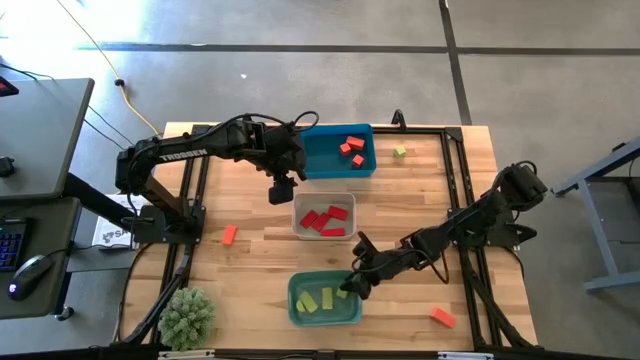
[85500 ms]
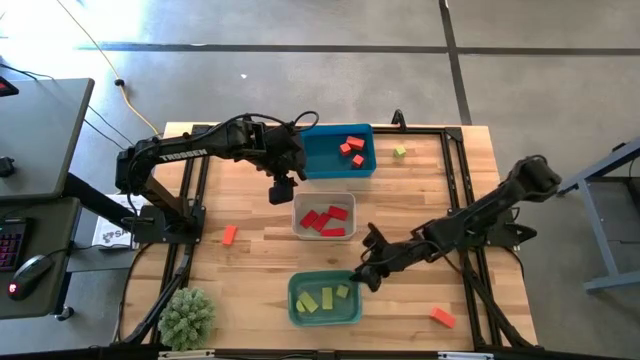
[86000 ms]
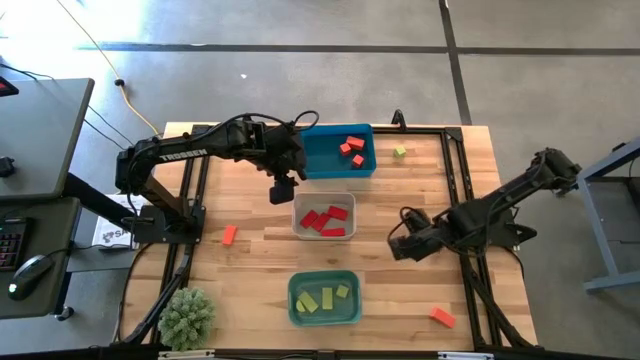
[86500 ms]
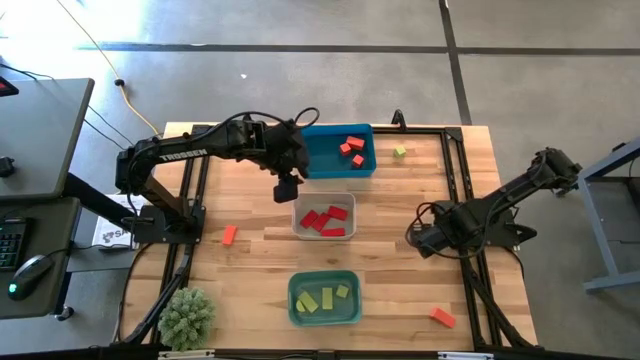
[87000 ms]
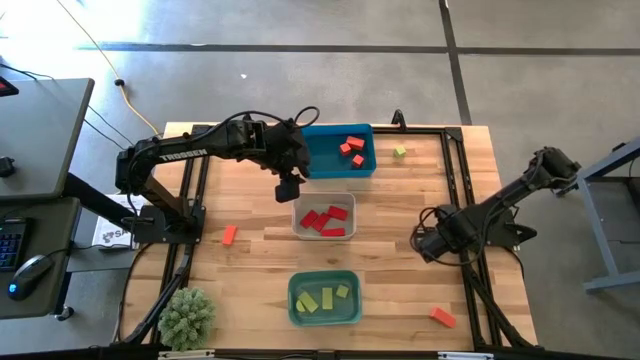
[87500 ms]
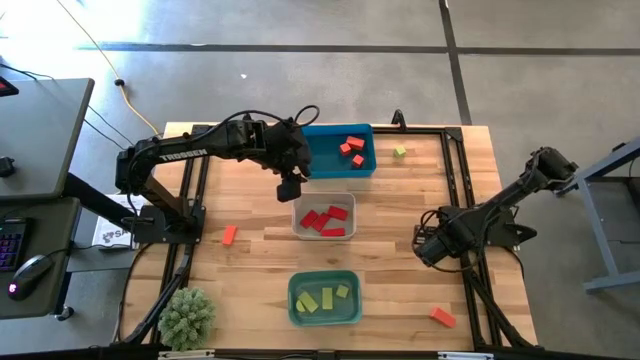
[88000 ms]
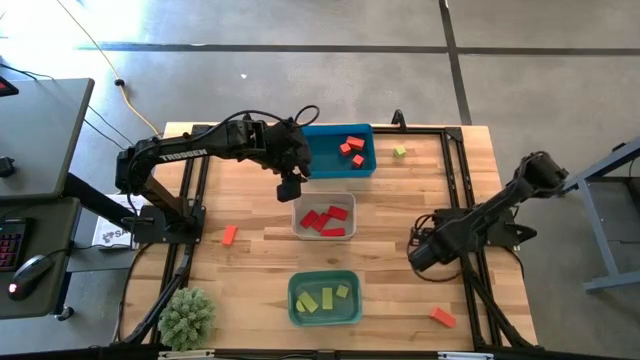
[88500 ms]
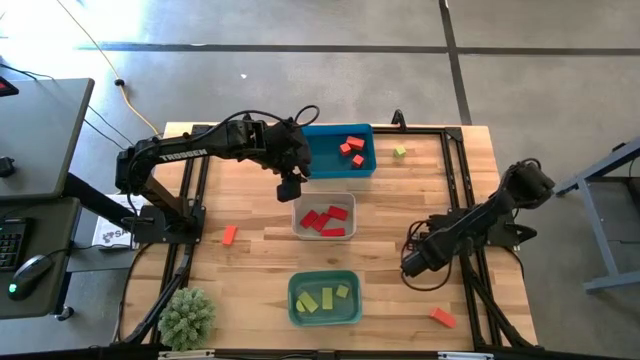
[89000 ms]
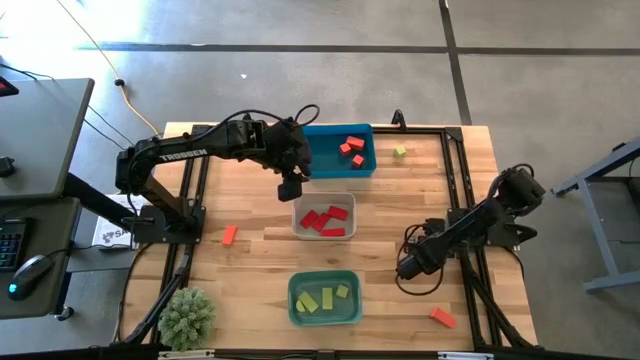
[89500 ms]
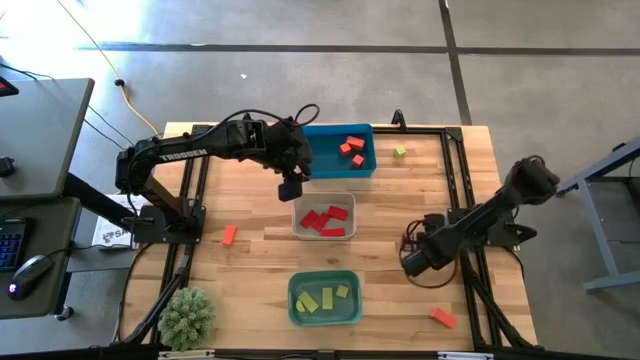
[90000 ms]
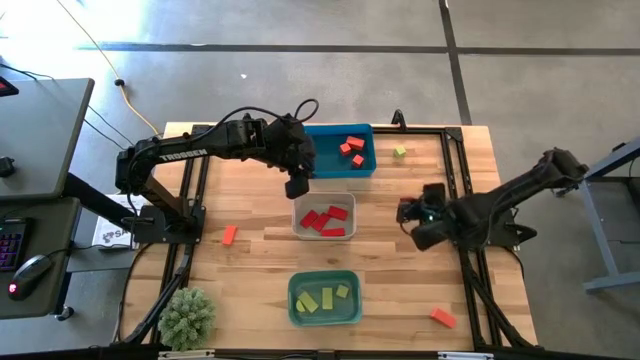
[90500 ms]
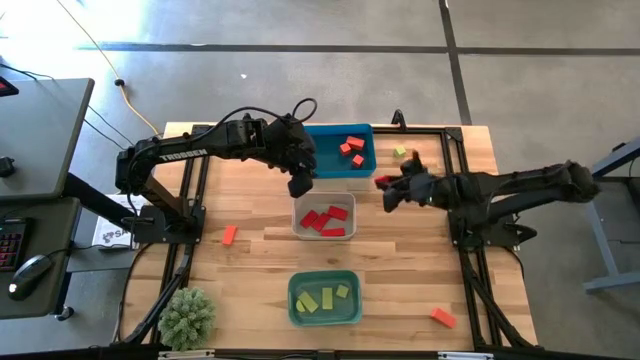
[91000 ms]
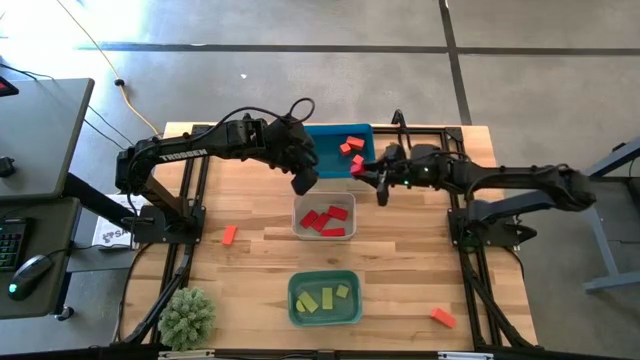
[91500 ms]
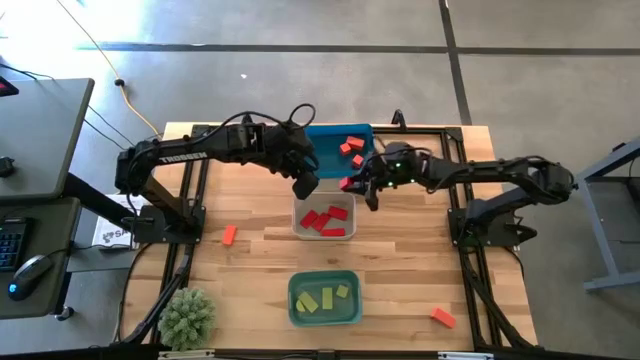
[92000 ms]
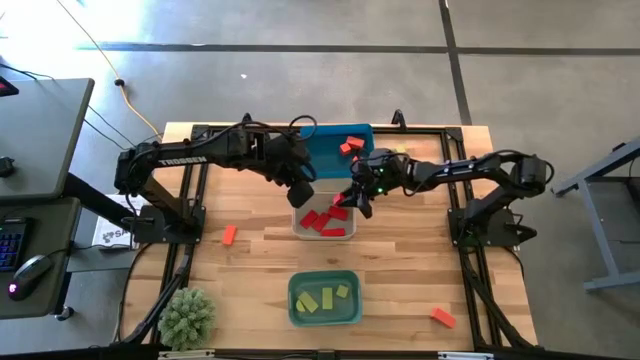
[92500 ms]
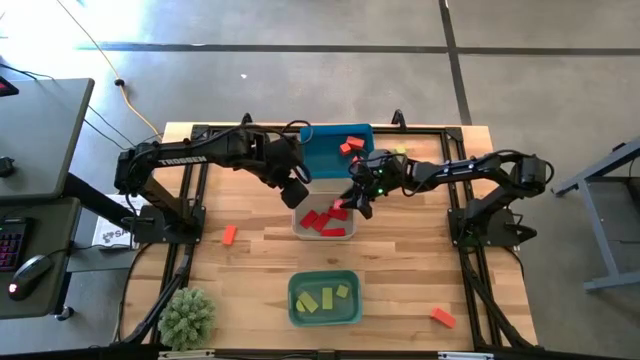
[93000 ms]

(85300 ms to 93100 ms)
Task: Sort & place blocks by color
Put the red block into the gray bin

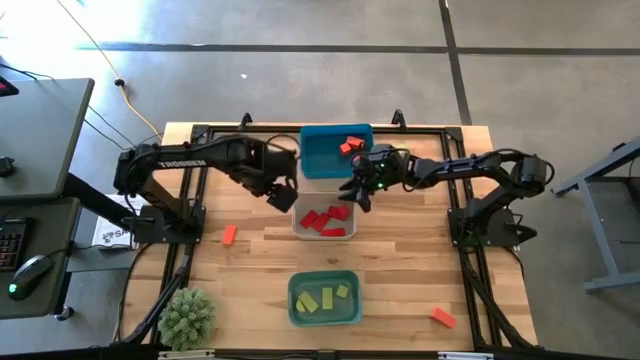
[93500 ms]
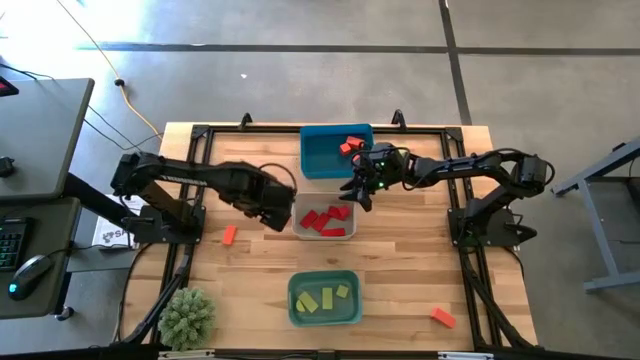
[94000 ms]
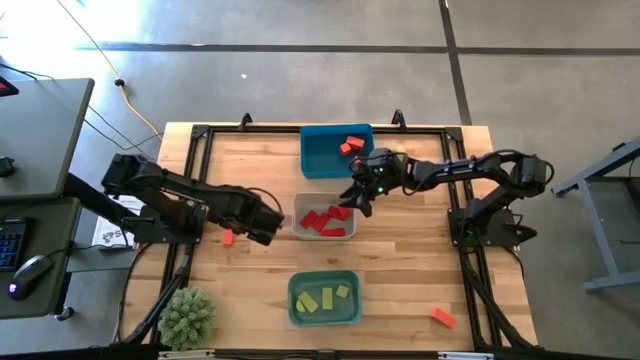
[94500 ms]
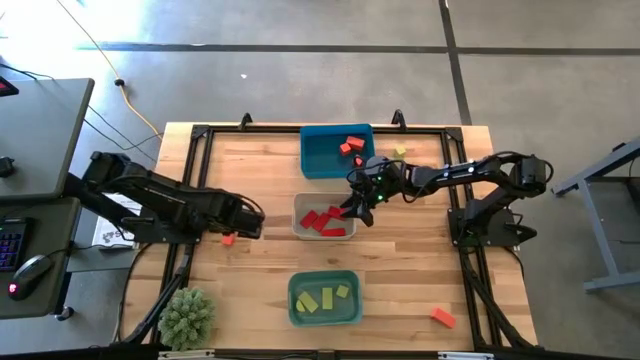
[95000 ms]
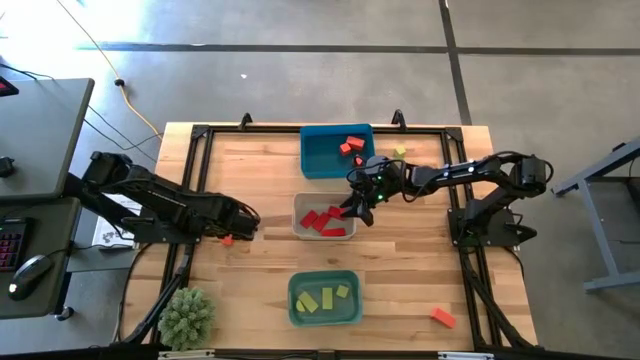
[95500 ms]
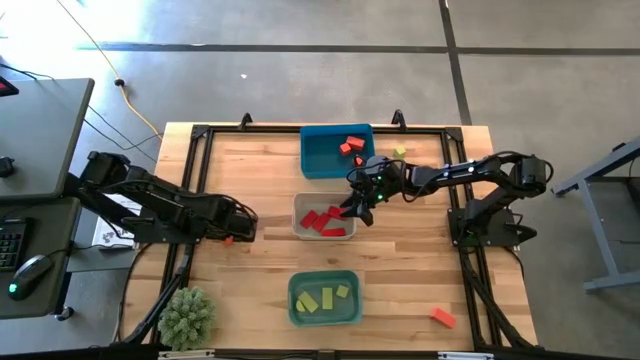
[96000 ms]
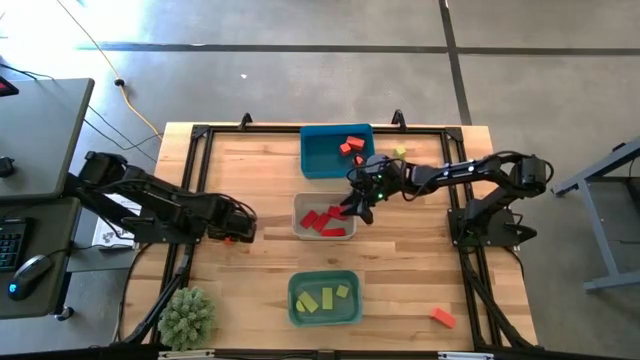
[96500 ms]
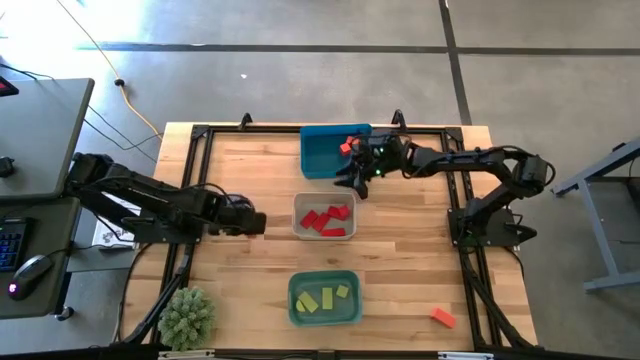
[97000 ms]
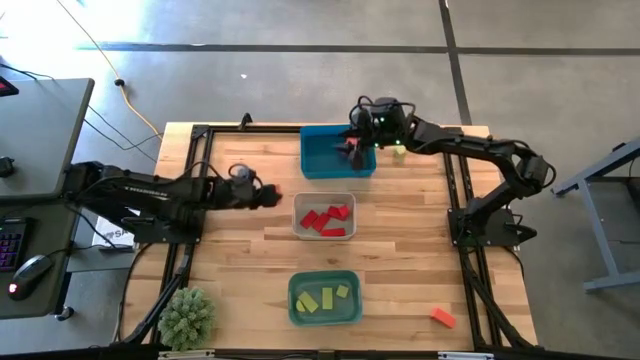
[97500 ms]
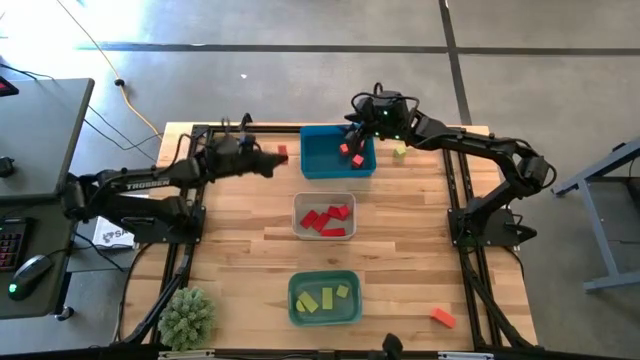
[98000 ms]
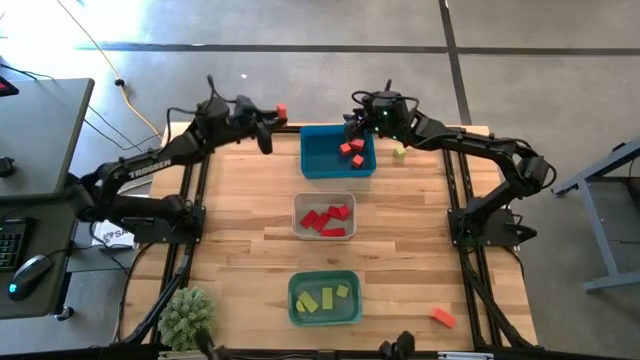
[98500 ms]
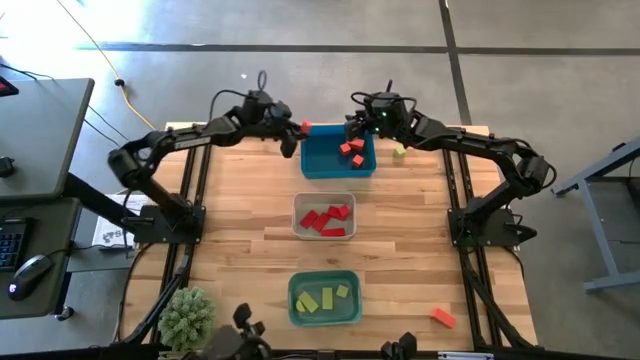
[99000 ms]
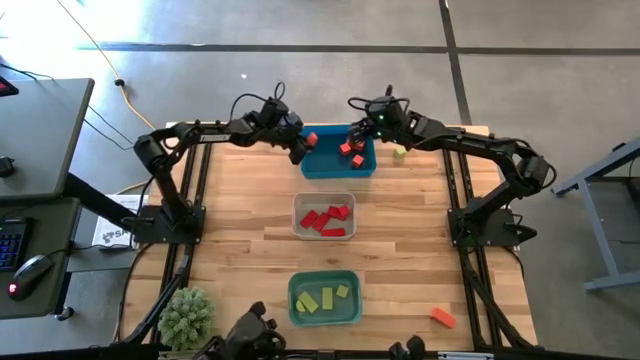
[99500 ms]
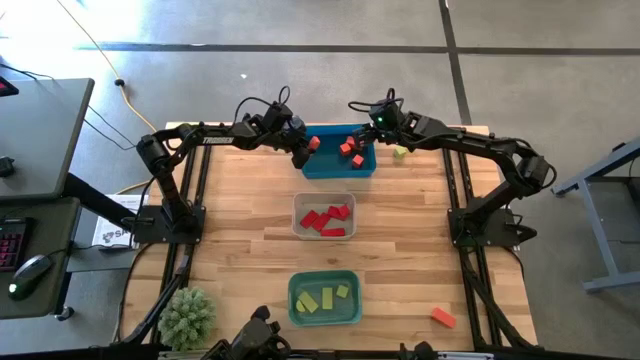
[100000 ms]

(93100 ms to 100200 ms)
Put the orange block into the blue bin

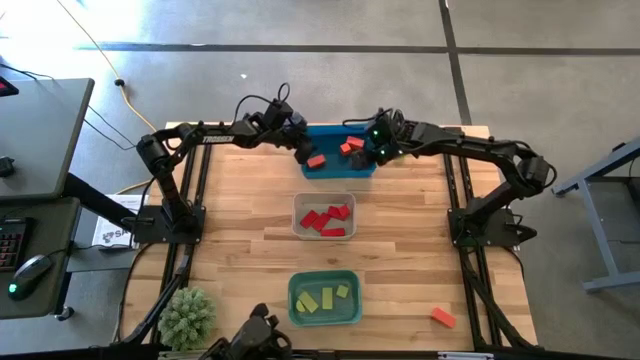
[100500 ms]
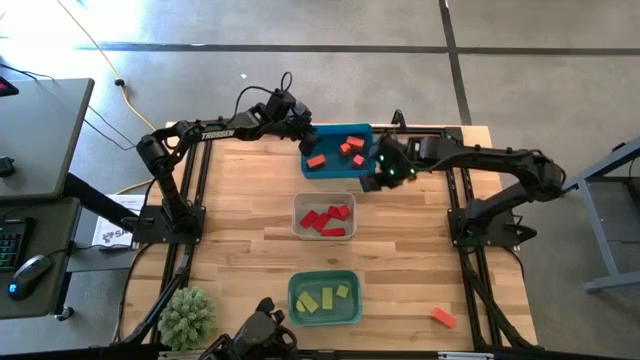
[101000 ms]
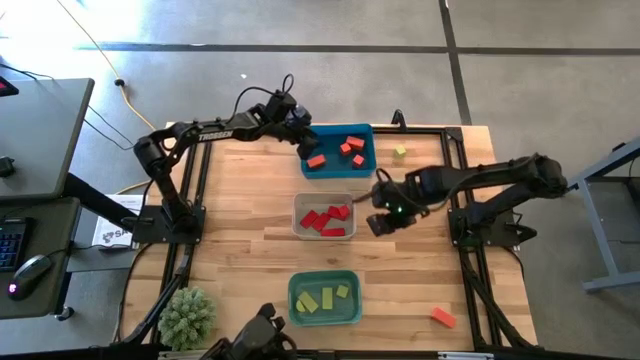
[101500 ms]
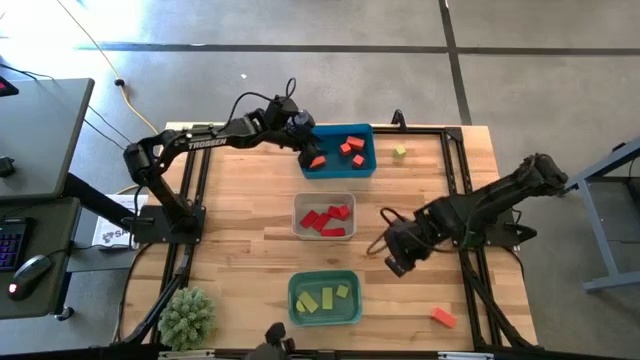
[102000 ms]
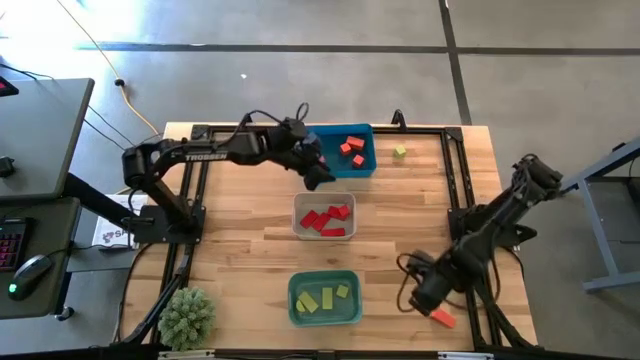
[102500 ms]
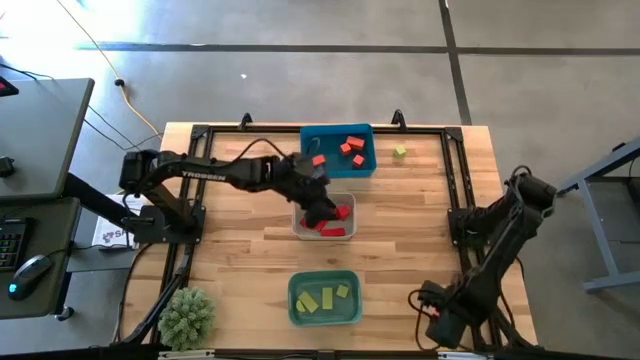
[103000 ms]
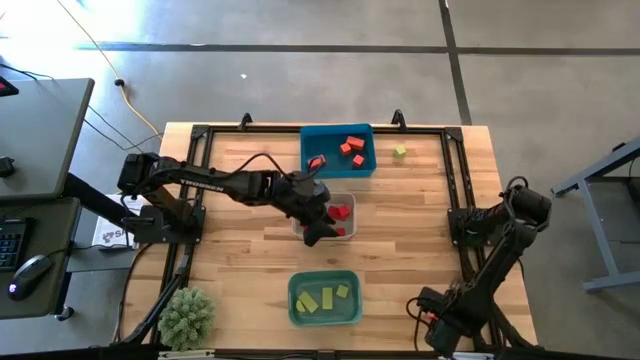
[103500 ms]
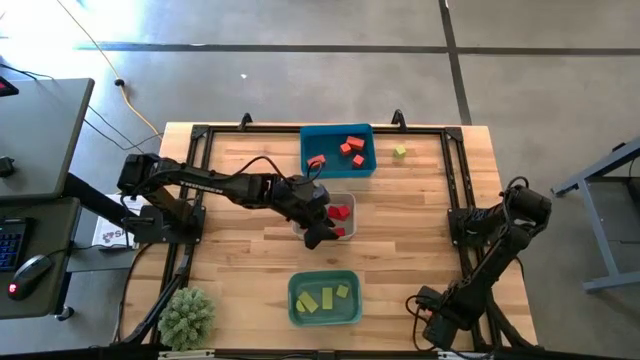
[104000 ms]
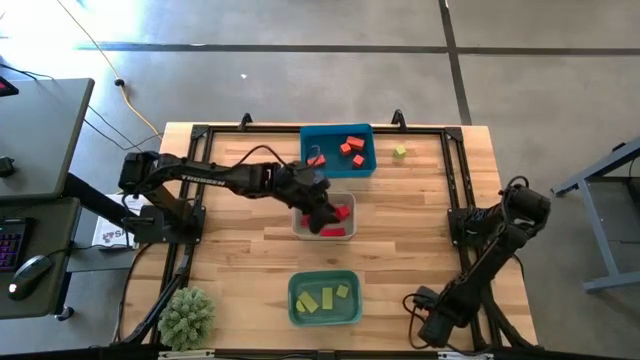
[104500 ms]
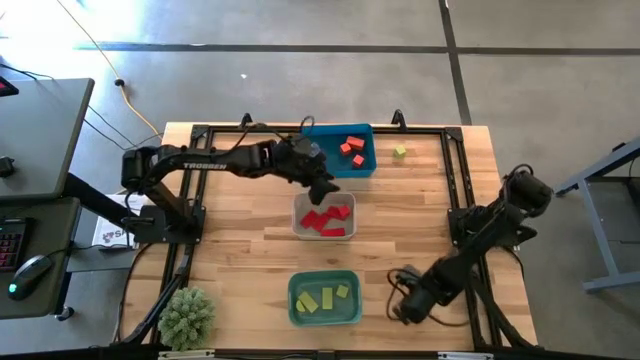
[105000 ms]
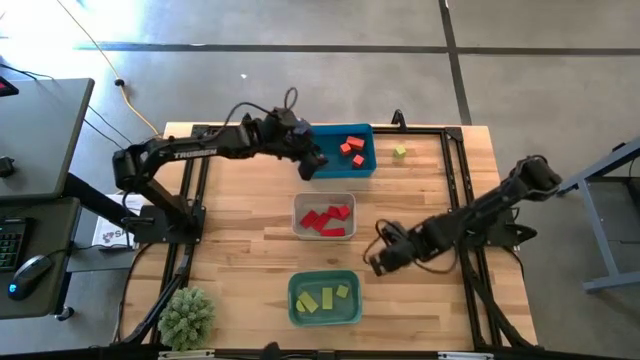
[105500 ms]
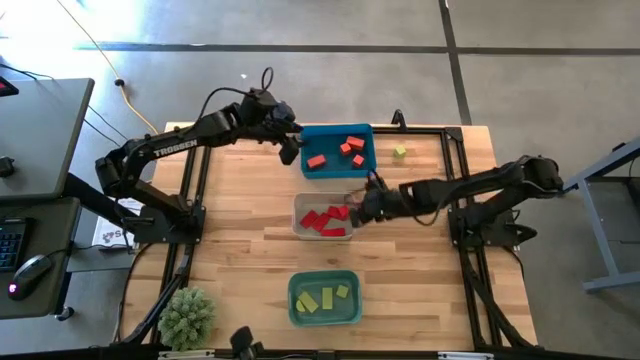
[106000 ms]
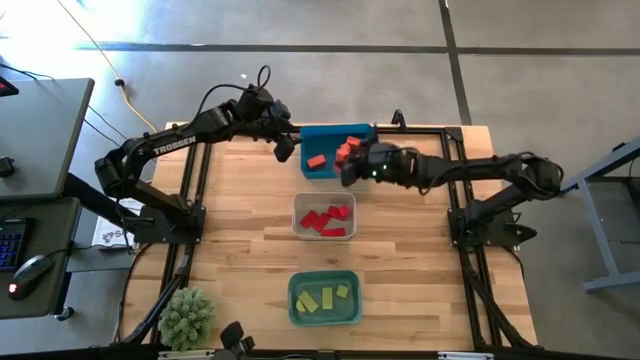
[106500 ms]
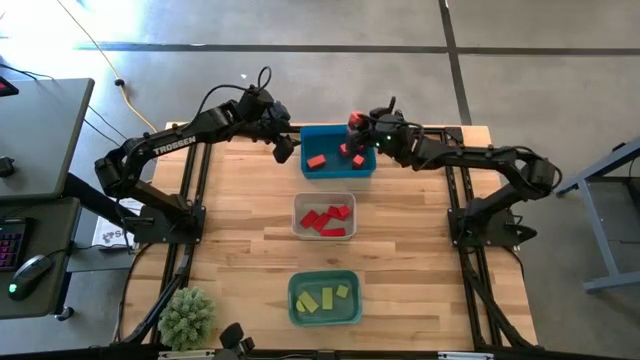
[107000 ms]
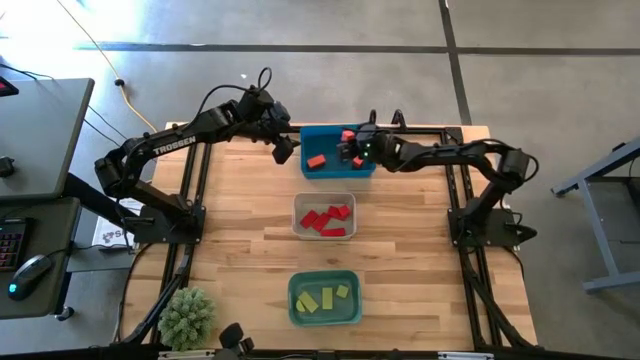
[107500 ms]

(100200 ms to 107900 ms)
Put the orange block into the blue bin
